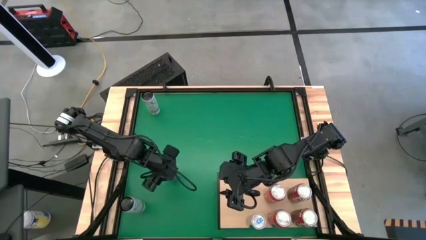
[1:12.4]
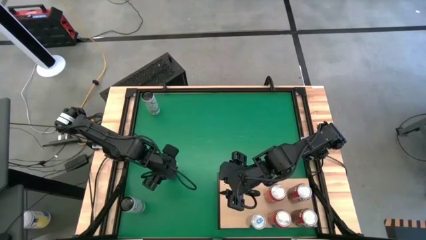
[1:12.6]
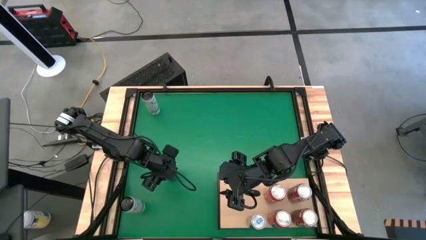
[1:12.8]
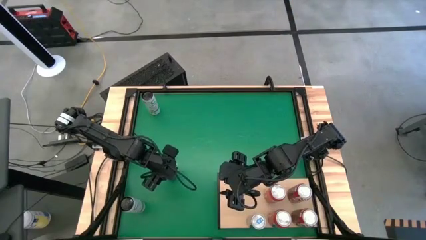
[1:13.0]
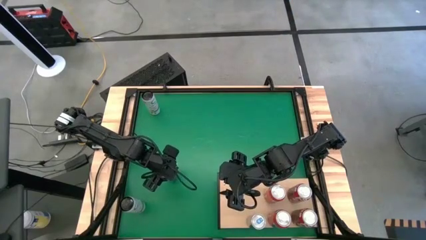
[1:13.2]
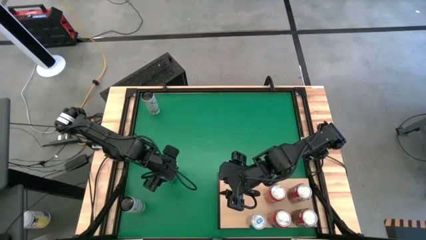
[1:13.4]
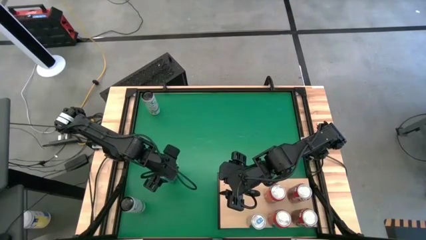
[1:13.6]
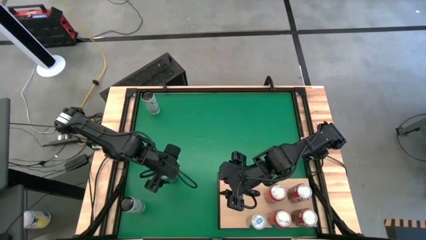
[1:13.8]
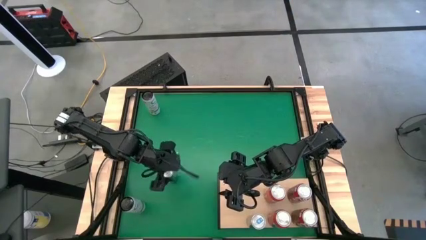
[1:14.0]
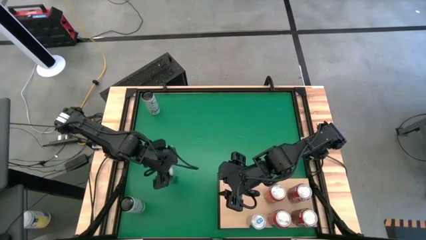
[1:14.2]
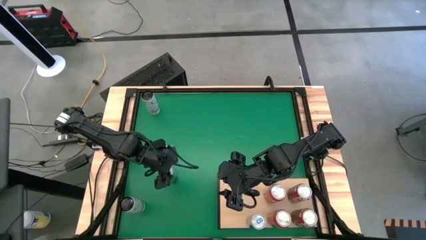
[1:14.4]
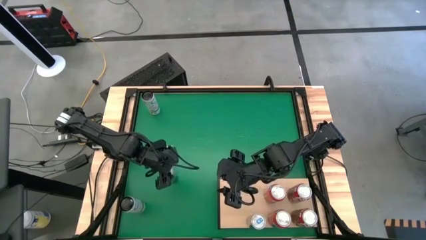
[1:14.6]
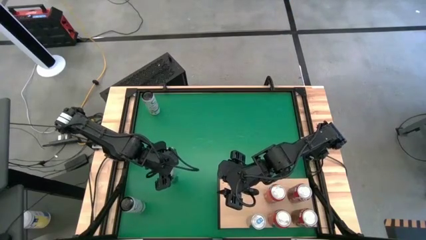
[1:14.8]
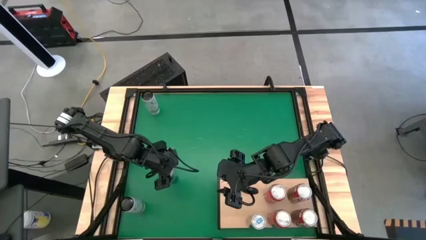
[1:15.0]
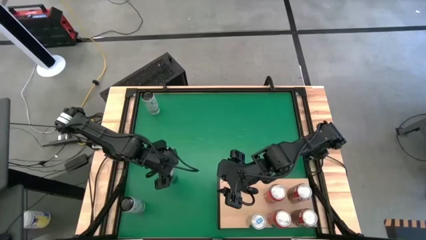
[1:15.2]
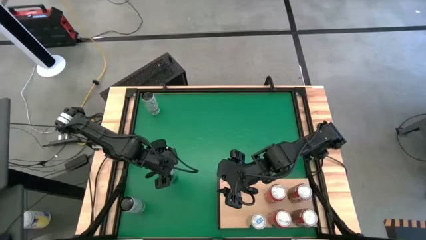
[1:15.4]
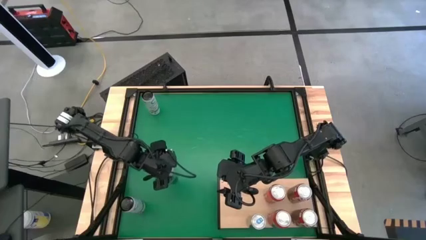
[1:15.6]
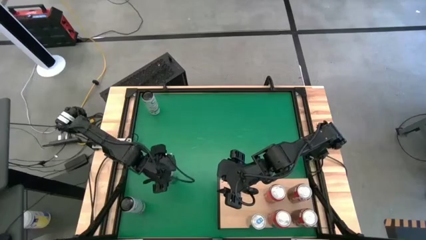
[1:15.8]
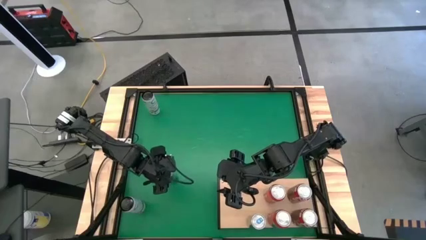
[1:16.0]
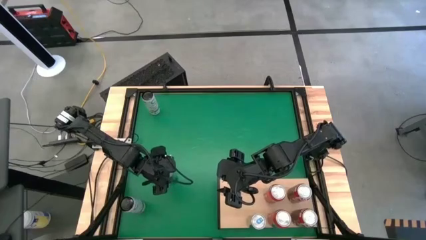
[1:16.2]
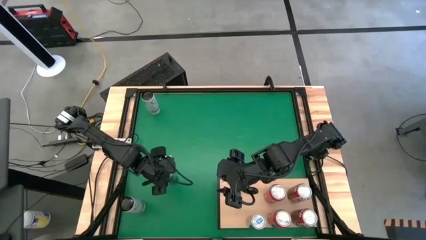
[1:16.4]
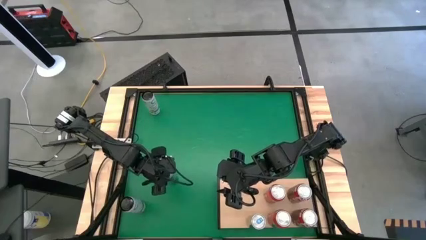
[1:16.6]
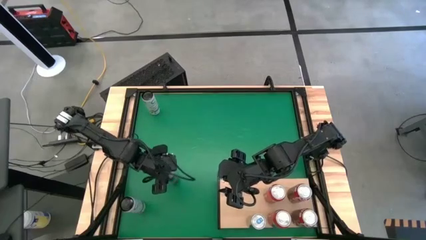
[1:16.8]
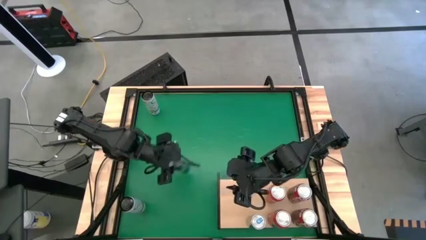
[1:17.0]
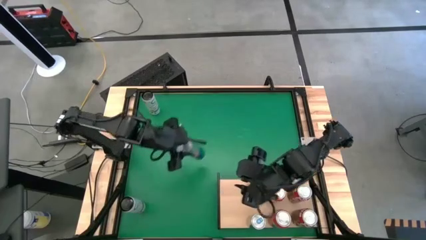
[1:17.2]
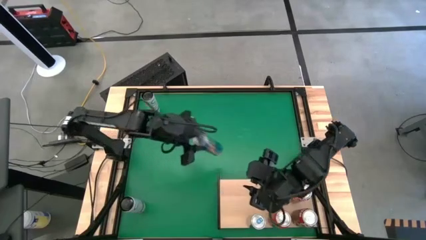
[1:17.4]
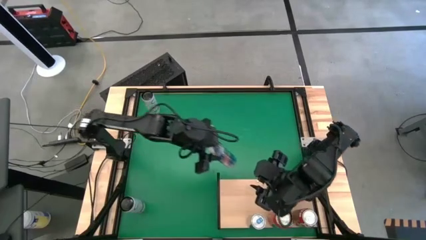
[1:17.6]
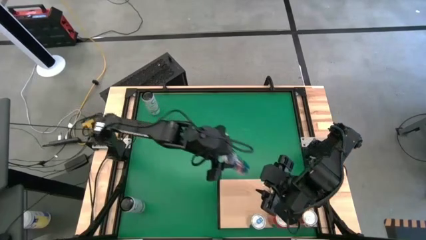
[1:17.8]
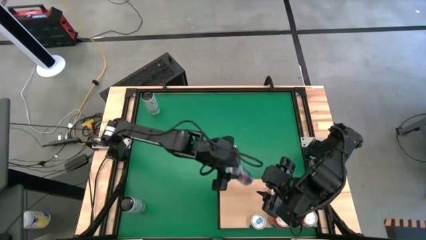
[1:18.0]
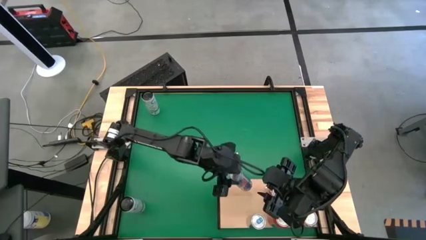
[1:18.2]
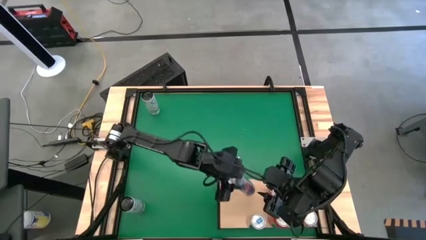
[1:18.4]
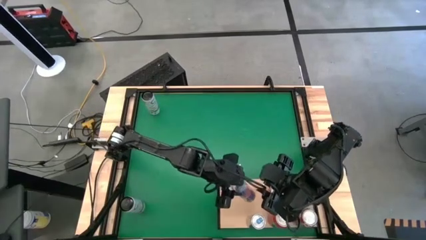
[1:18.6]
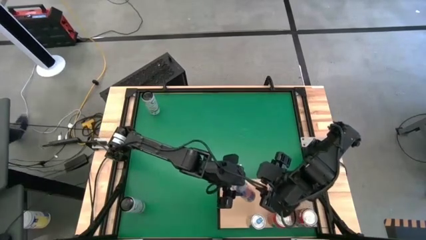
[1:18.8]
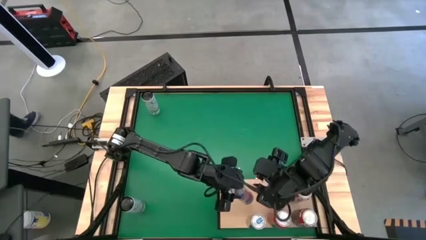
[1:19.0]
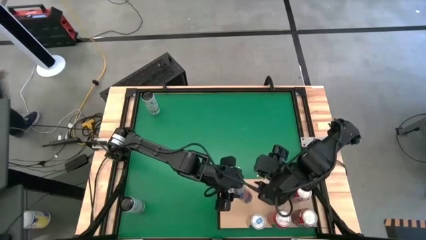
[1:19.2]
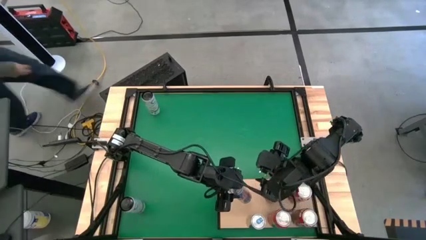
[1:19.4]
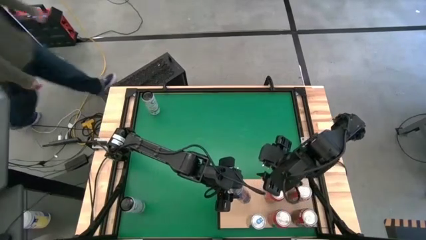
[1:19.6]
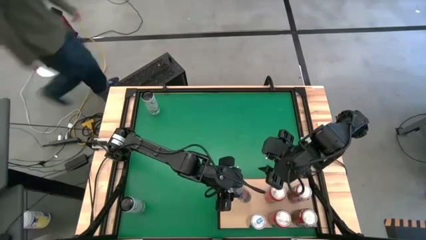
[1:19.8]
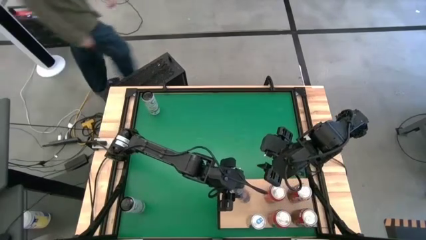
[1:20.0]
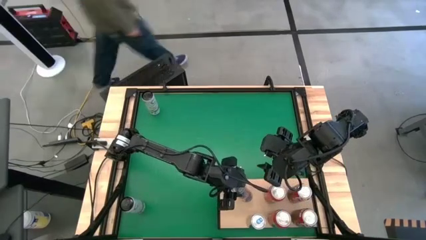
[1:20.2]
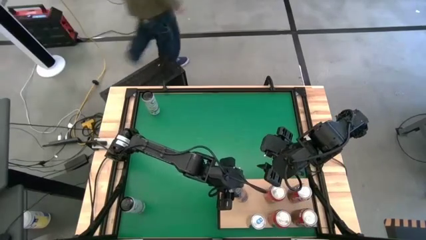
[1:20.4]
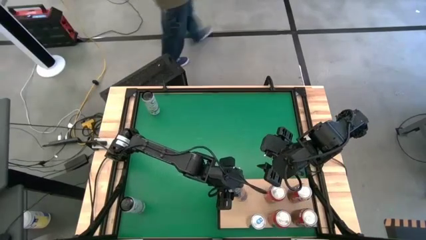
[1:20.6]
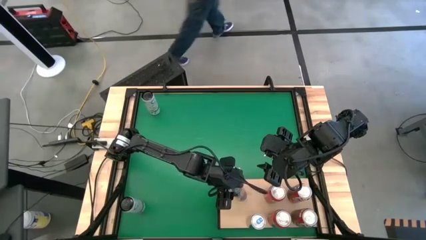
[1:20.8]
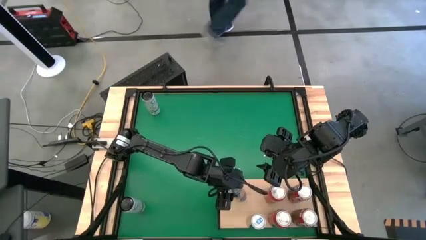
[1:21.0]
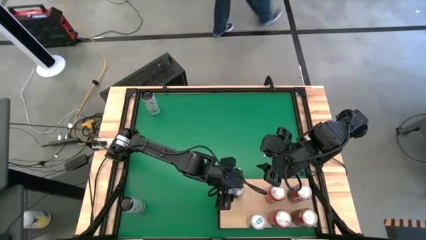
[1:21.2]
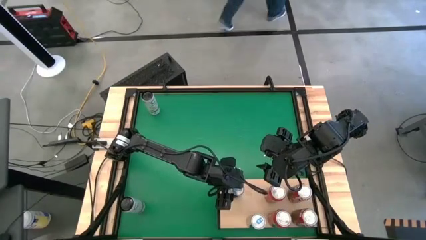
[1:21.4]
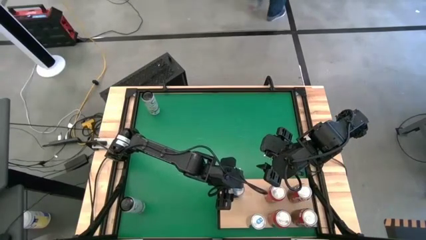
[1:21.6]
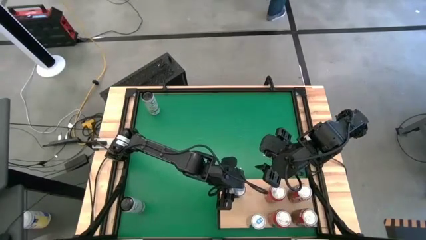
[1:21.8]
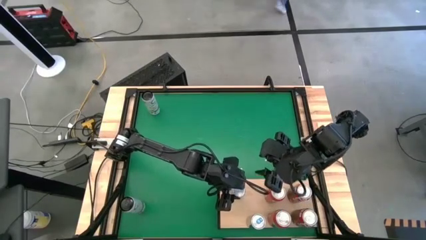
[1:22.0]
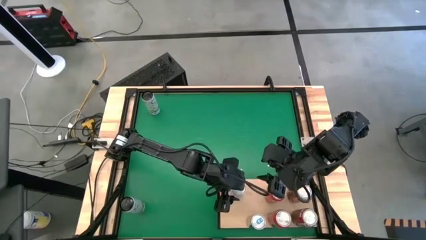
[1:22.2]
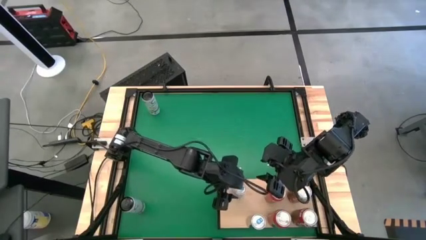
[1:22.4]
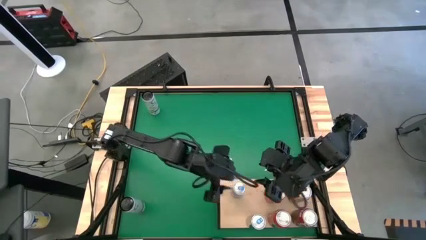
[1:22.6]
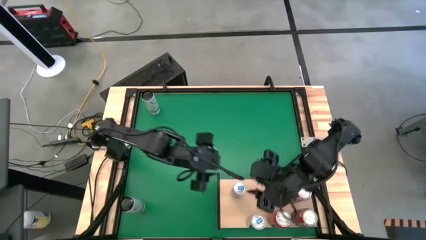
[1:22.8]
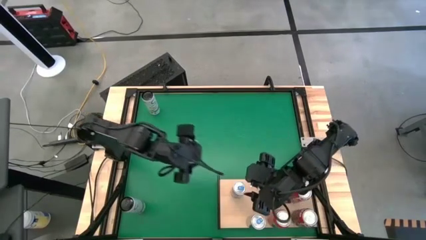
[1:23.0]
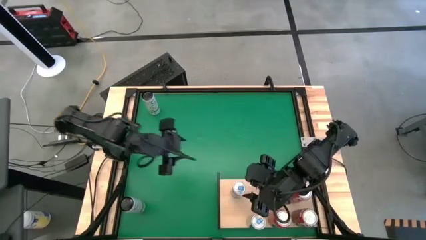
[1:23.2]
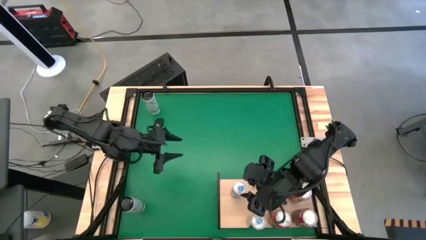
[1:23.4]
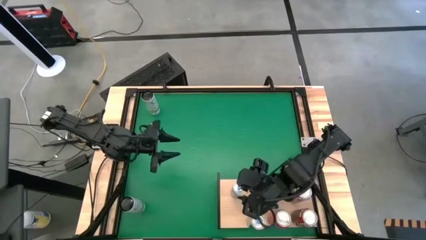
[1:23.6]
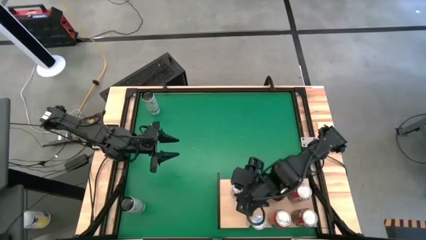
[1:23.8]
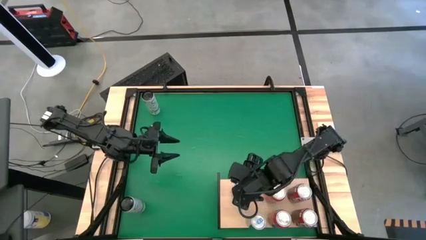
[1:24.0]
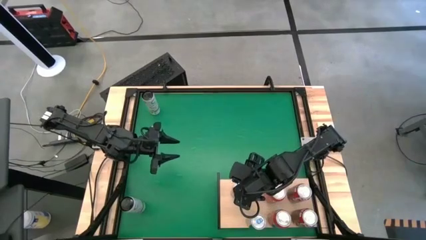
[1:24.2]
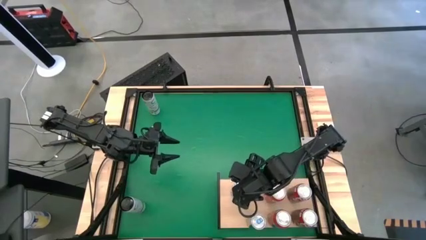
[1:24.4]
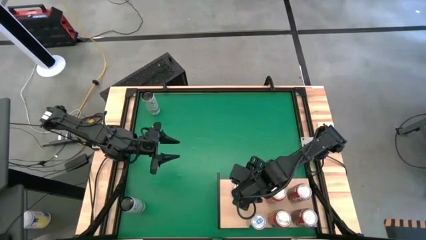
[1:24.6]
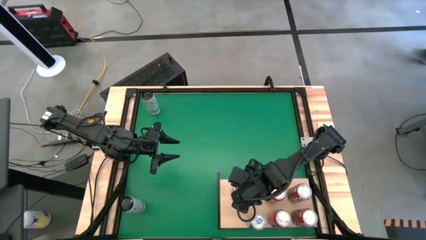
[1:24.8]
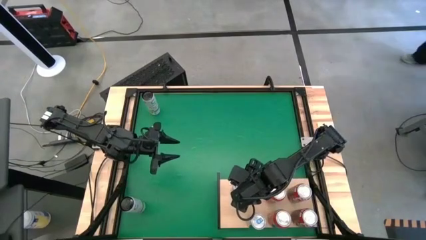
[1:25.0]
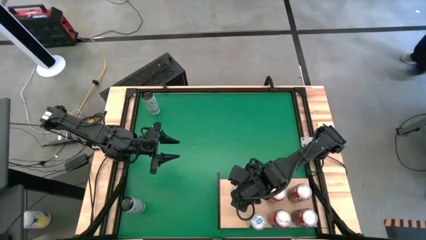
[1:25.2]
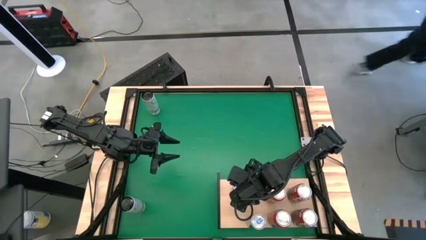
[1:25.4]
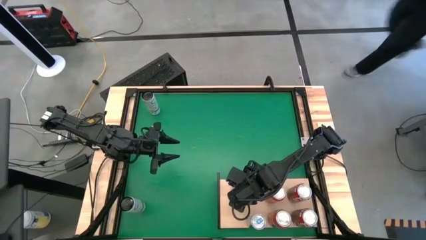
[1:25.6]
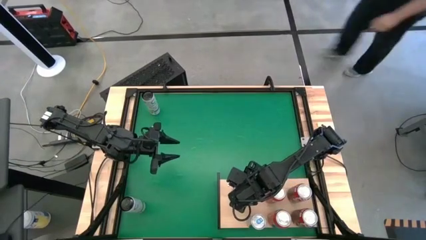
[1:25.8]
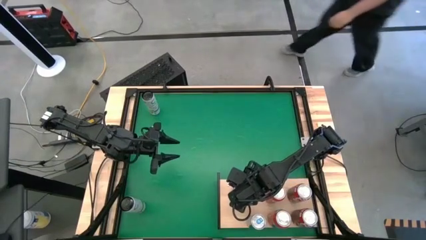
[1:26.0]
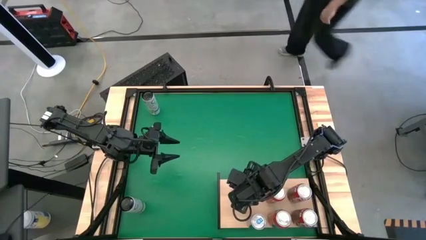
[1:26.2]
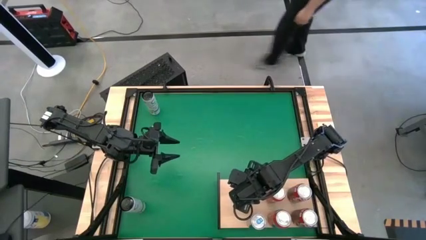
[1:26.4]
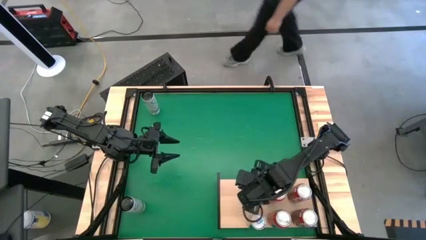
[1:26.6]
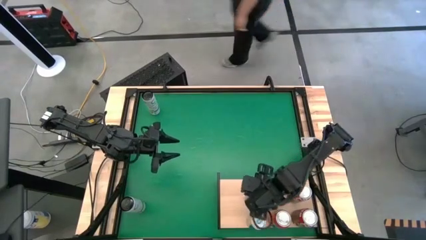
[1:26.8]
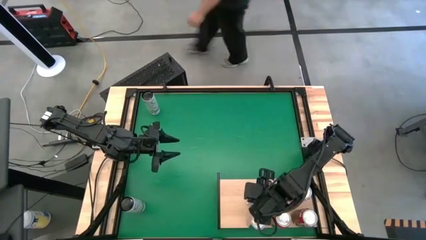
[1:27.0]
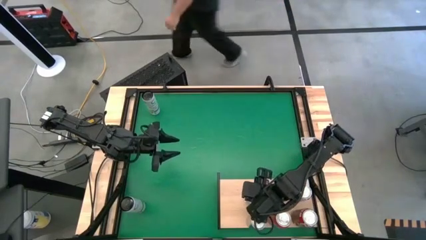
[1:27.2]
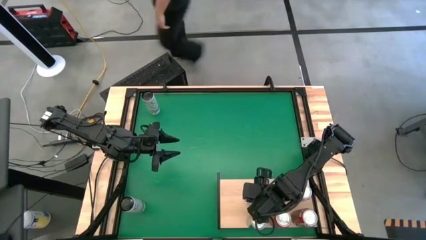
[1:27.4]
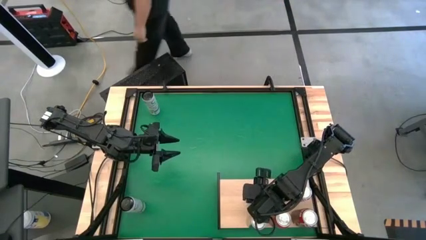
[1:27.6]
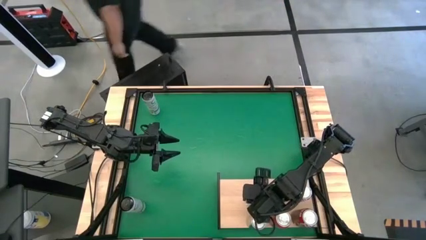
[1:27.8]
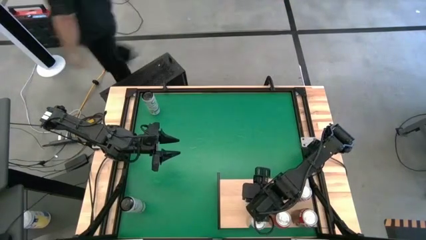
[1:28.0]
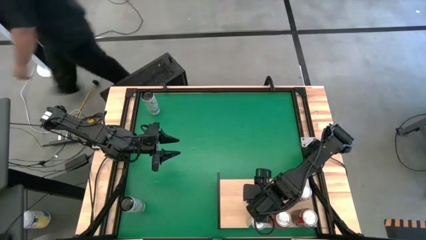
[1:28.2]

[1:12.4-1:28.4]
Task: Place canned beverage on shelf
Put the blue soda can on the shelf aligned with the other blue soda can
